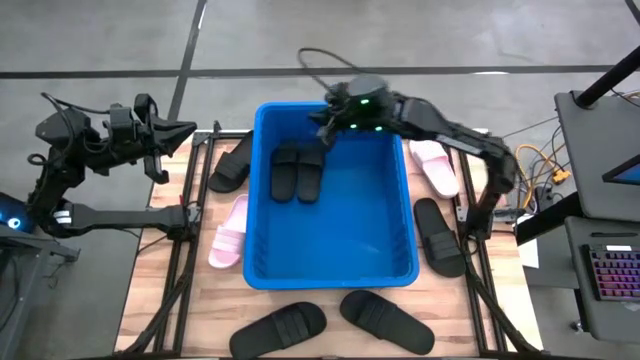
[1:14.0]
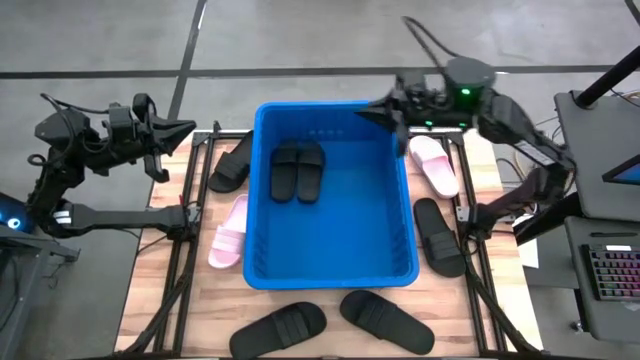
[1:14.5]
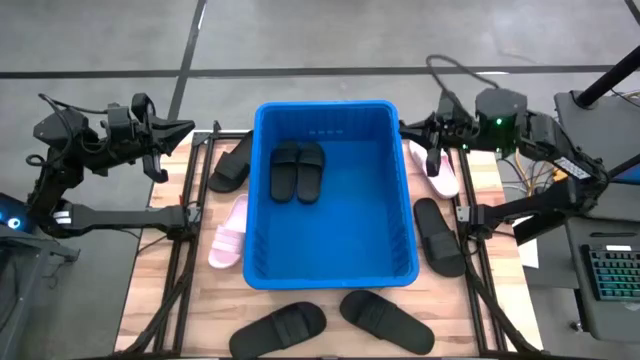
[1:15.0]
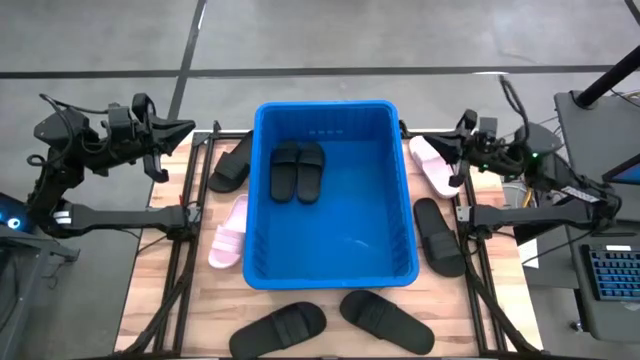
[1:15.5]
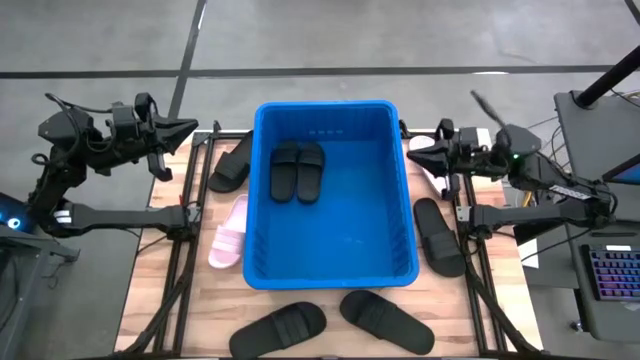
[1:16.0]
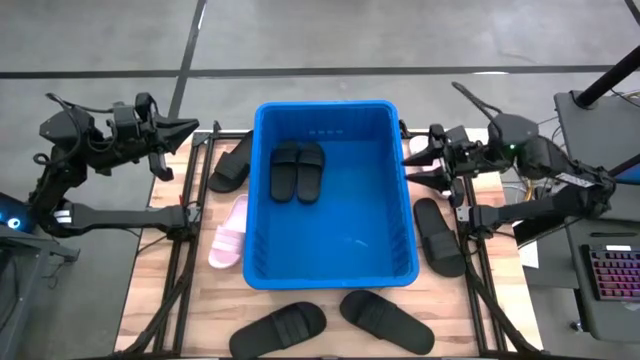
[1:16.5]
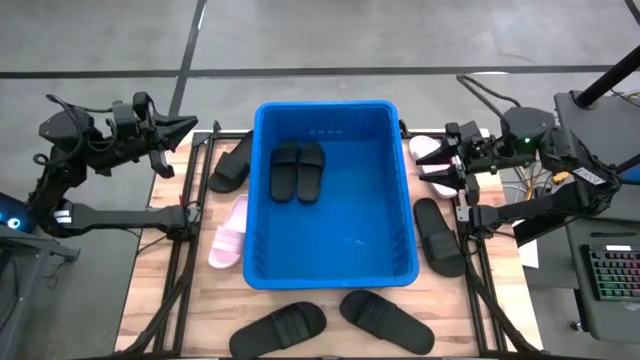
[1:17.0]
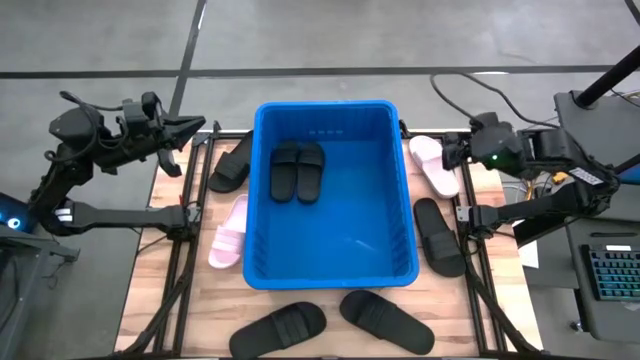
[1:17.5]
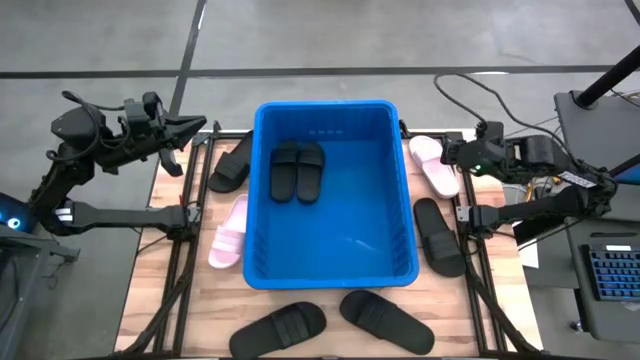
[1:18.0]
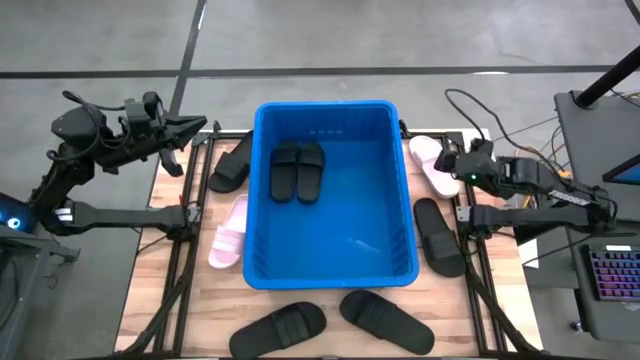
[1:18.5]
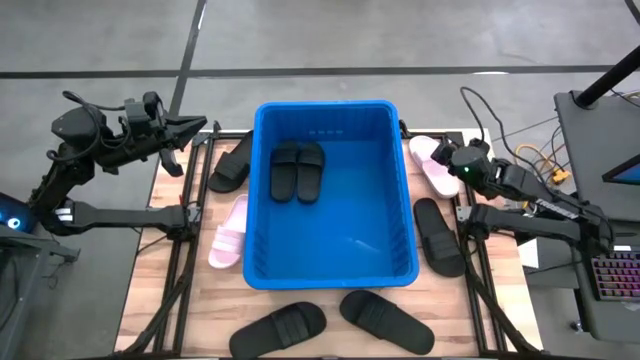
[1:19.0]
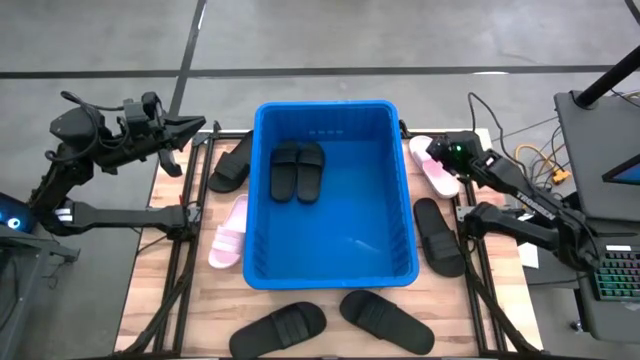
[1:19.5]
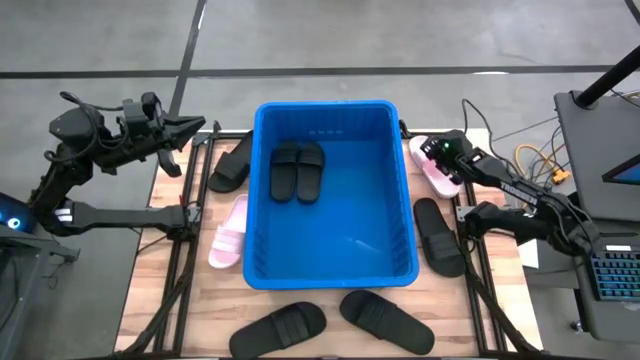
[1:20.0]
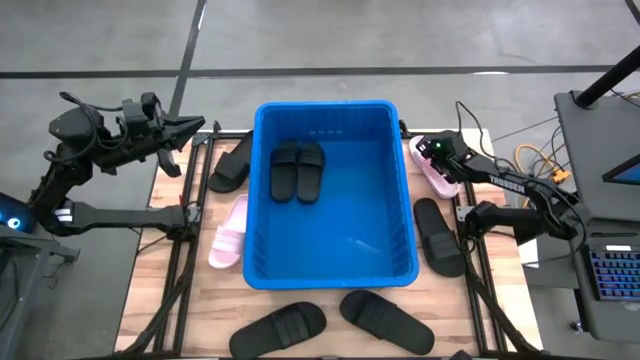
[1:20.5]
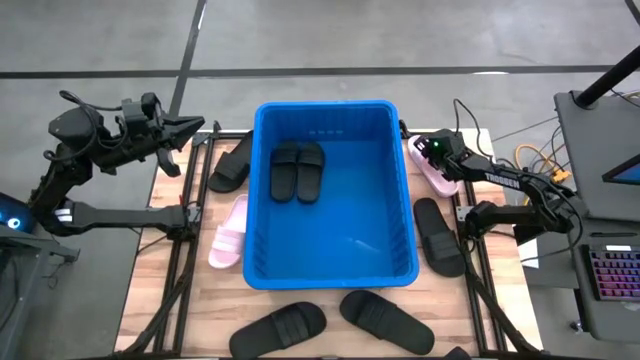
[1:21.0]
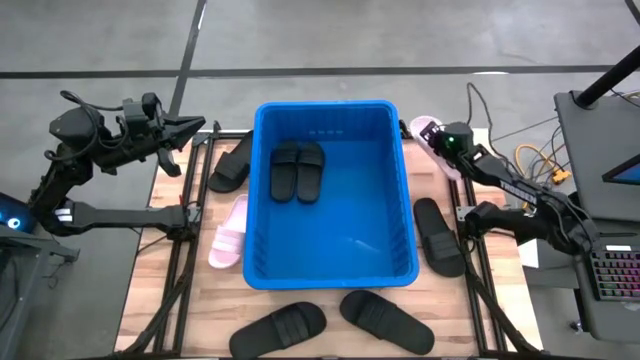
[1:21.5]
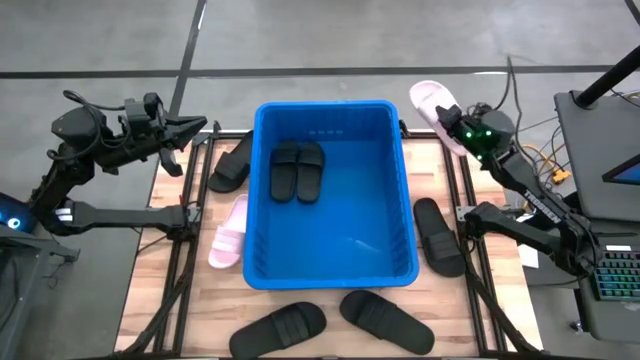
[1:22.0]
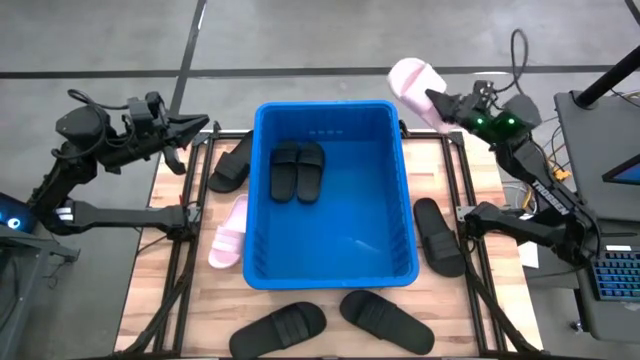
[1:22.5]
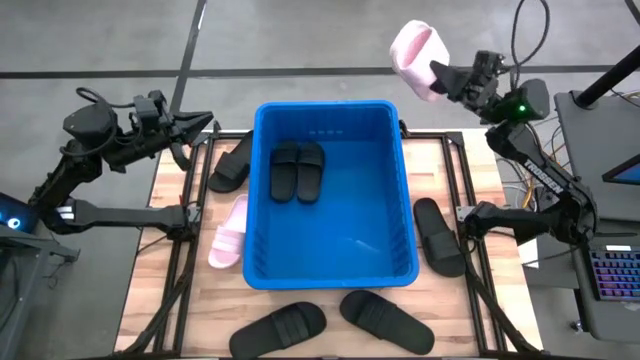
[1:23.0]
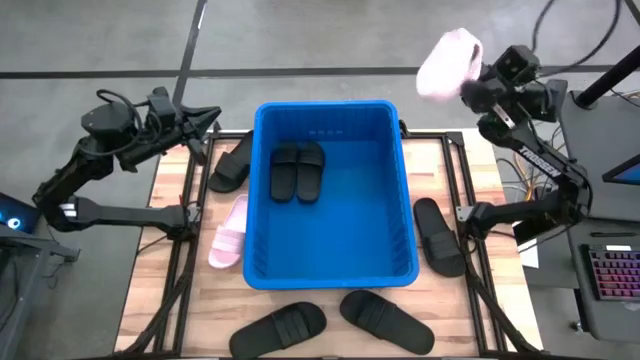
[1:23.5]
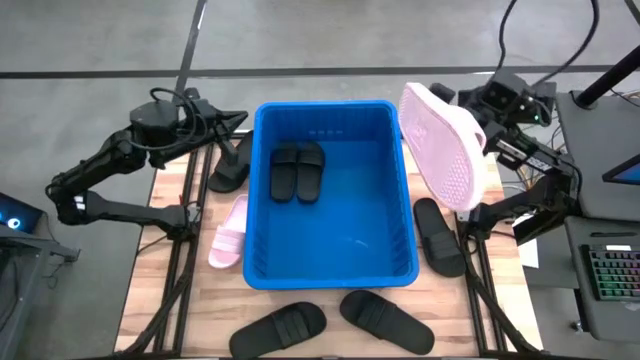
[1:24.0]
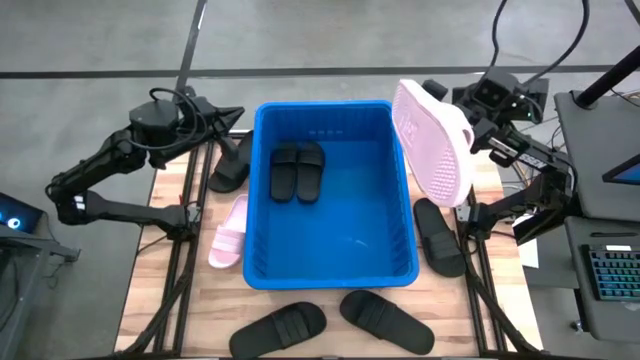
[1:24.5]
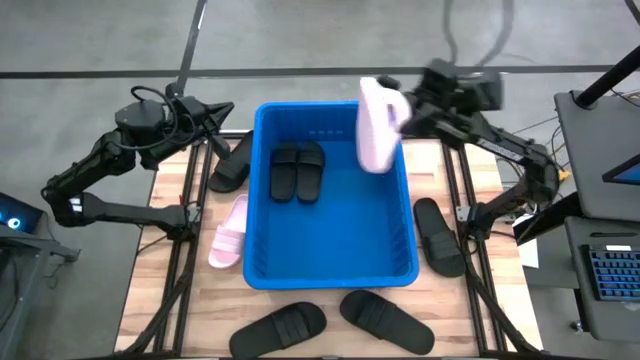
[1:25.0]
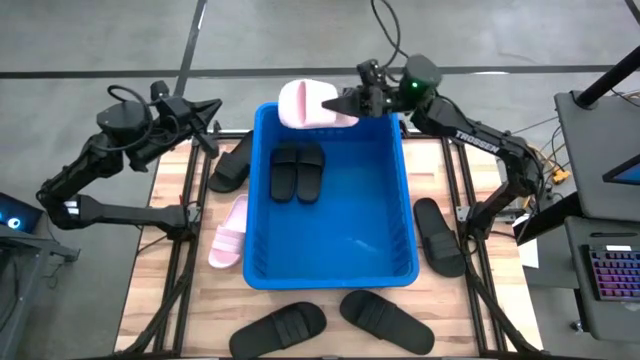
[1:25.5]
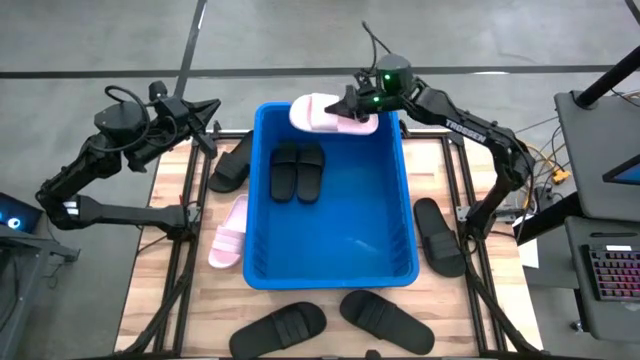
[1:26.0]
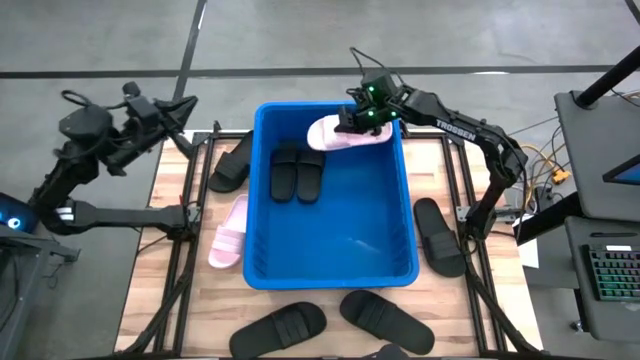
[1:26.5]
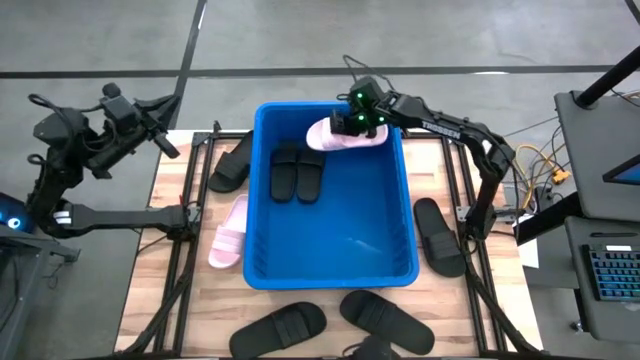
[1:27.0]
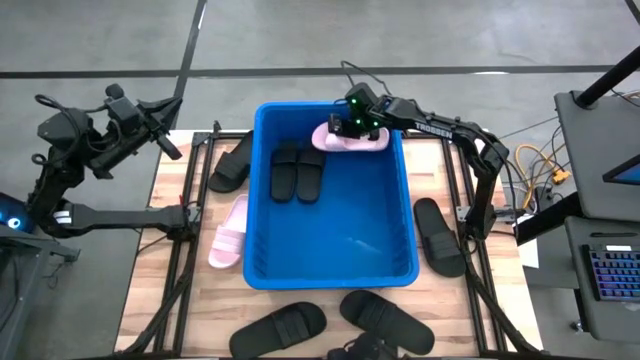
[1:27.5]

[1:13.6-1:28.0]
Task: Pick and place slides into bin
Put the pink slide into the blue bin

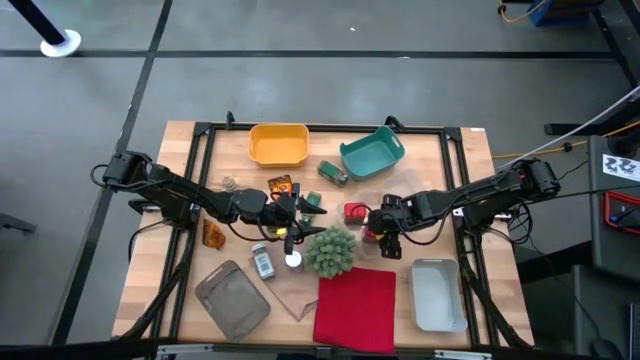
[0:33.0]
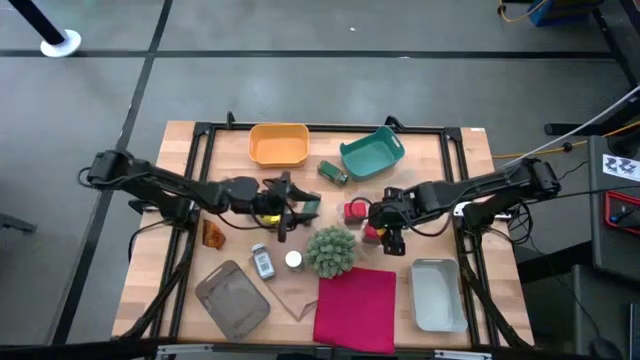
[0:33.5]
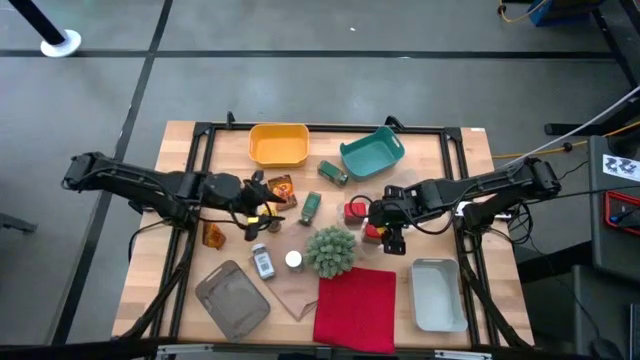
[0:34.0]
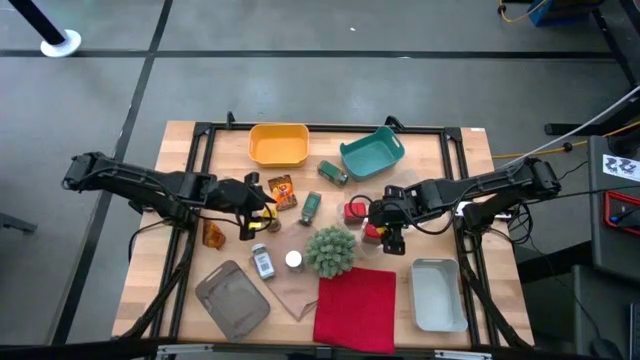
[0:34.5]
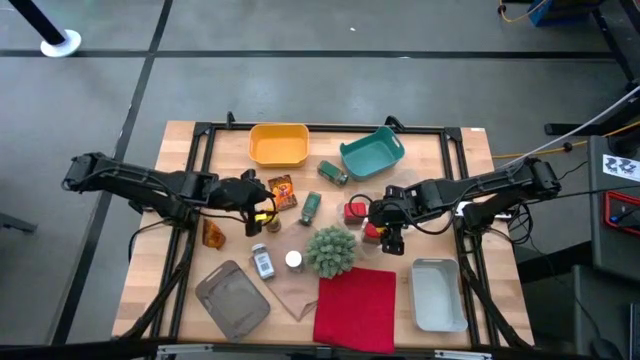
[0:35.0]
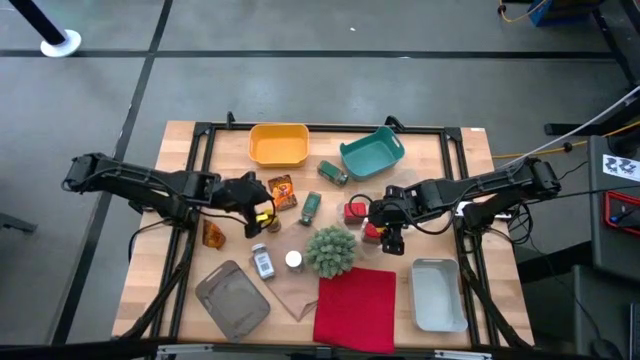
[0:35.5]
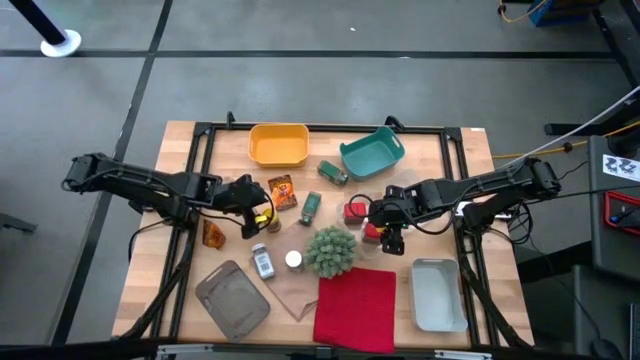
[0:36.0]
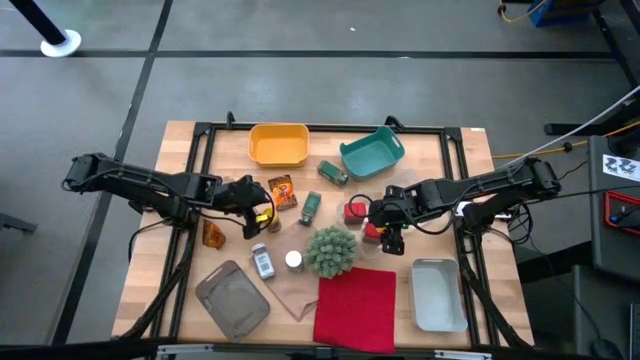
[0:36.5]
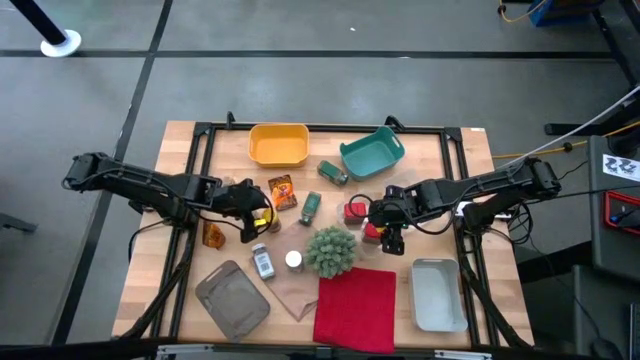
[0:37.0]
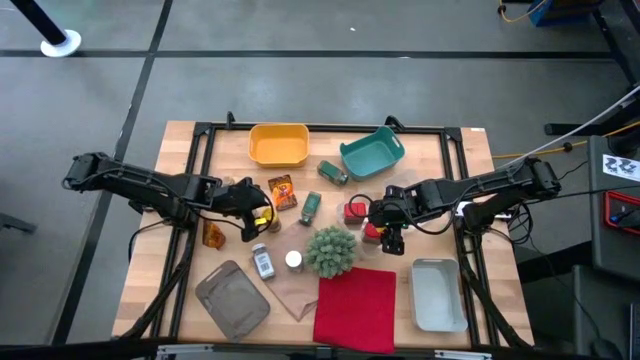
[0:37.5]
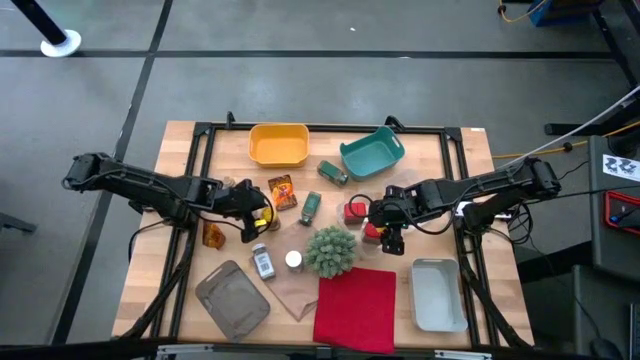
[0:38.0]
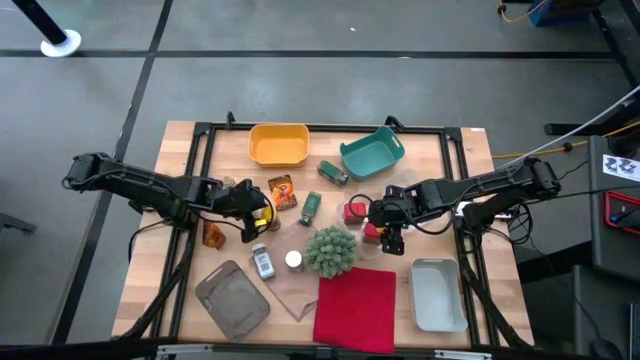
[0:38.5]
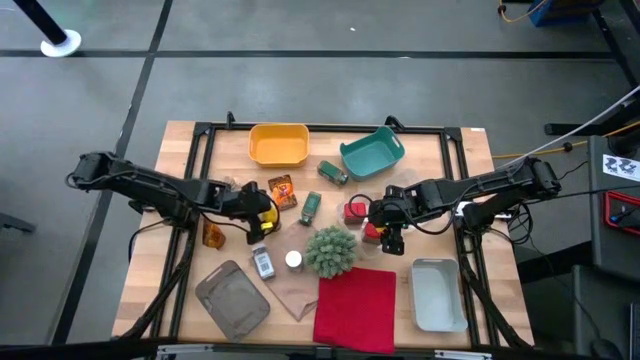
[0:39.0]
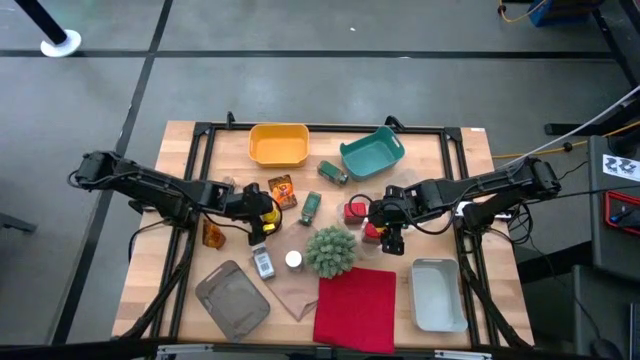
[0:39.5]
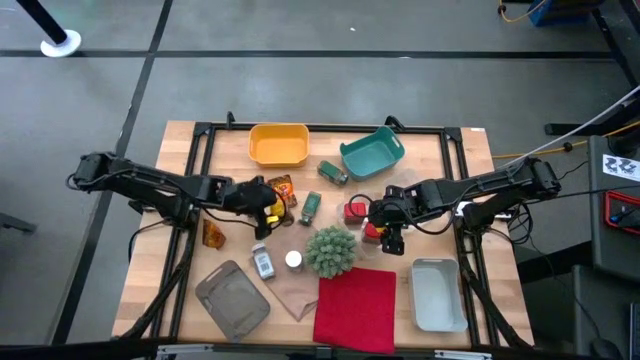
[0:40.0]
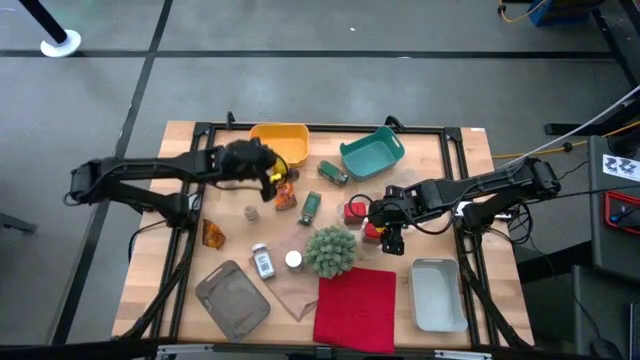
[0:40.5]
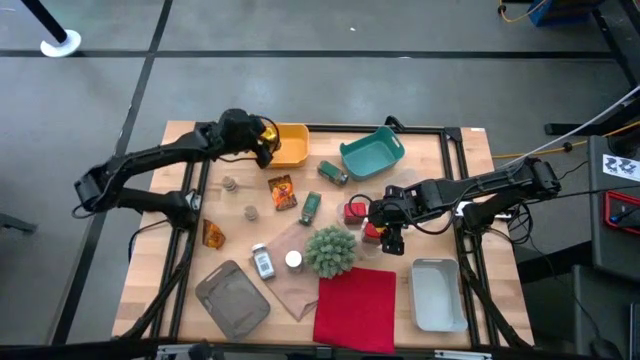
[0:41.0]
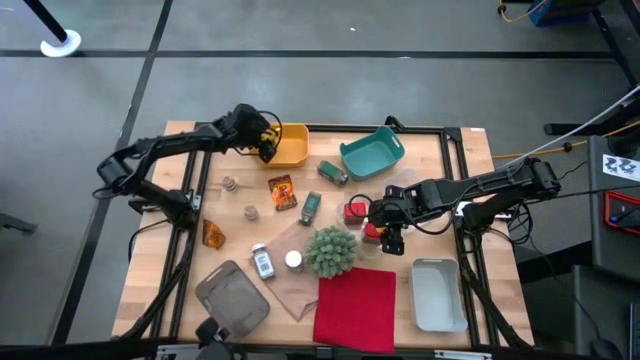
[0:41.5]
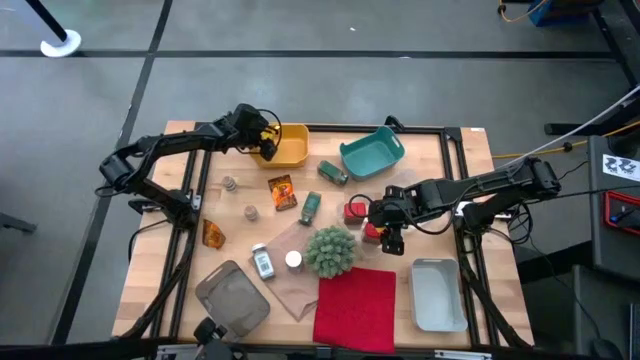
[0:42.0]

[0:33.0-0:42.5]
Task: Sort spices by type
Put the yellow seasoning bottle into the yellow bin
